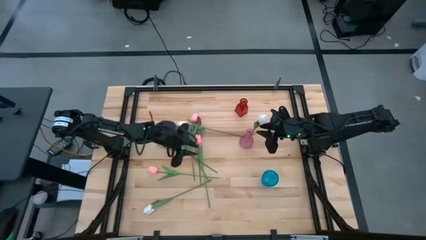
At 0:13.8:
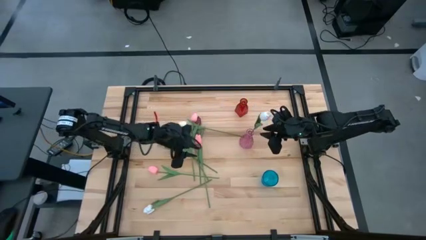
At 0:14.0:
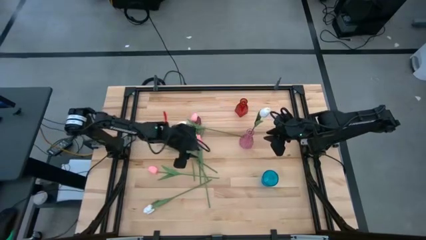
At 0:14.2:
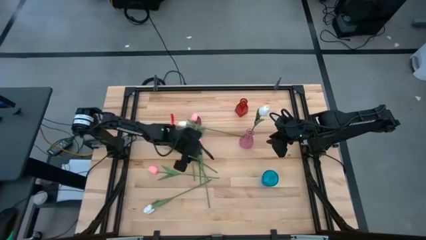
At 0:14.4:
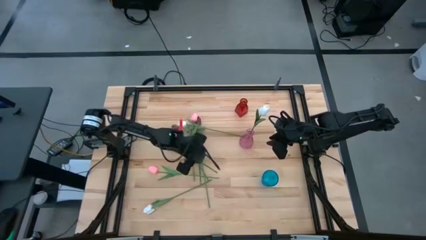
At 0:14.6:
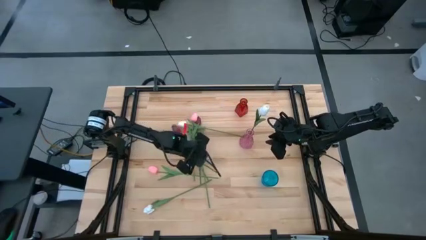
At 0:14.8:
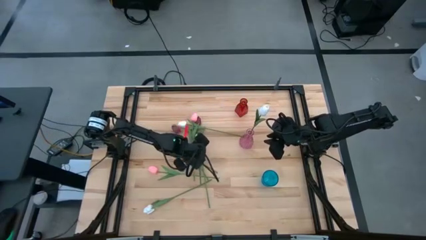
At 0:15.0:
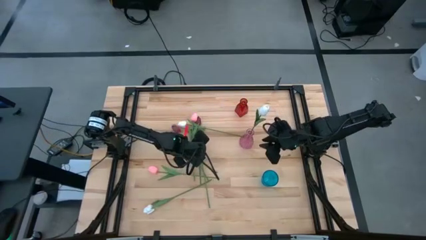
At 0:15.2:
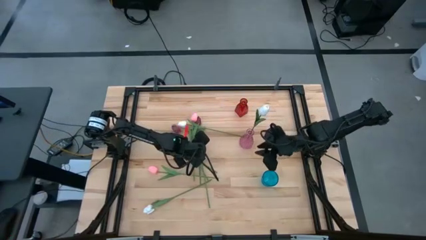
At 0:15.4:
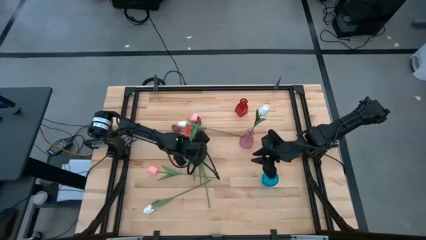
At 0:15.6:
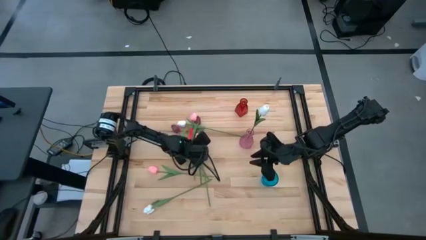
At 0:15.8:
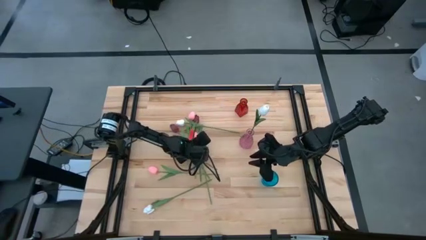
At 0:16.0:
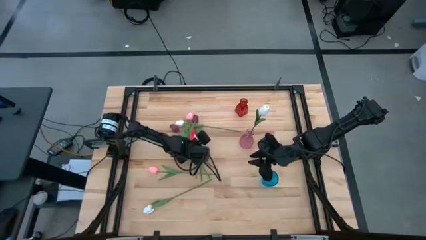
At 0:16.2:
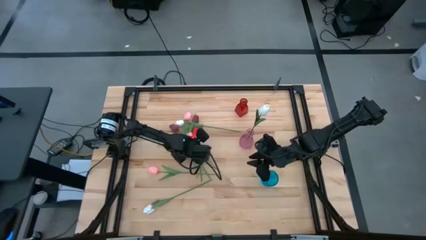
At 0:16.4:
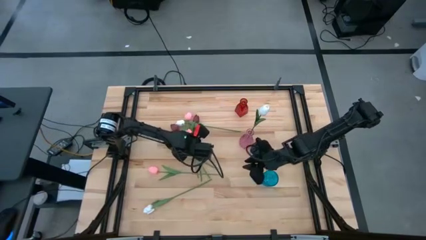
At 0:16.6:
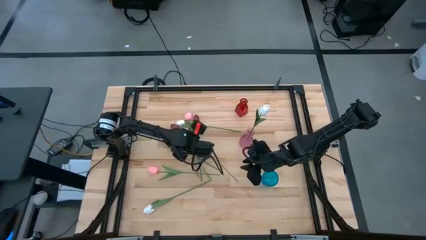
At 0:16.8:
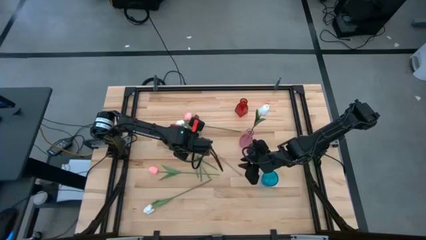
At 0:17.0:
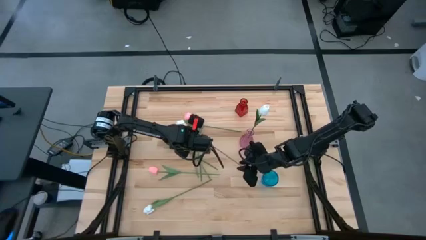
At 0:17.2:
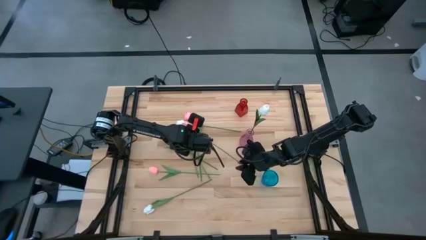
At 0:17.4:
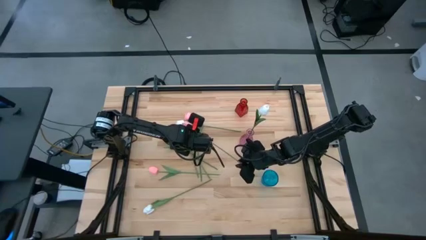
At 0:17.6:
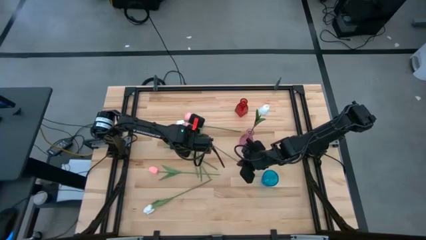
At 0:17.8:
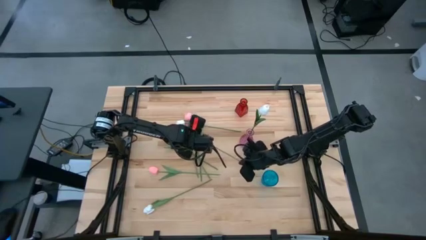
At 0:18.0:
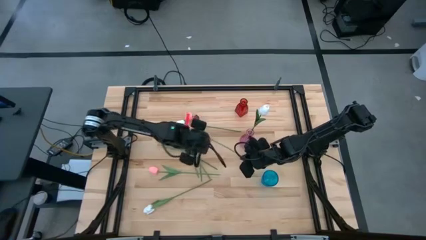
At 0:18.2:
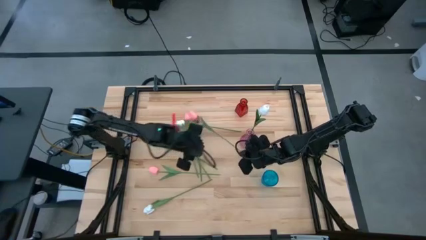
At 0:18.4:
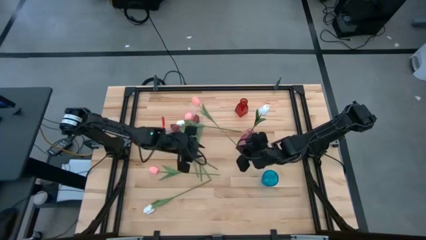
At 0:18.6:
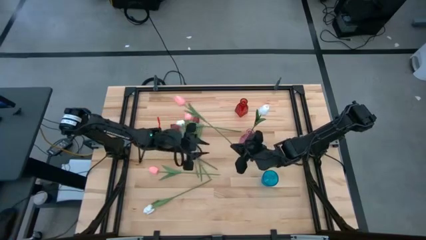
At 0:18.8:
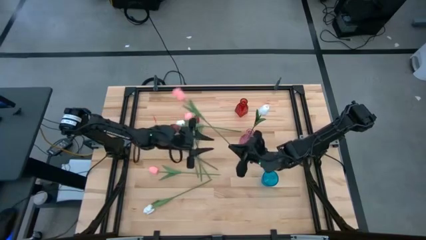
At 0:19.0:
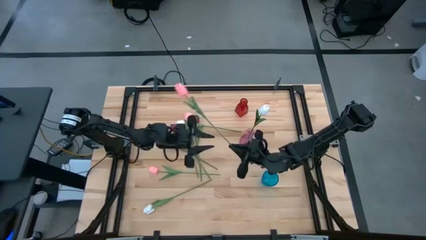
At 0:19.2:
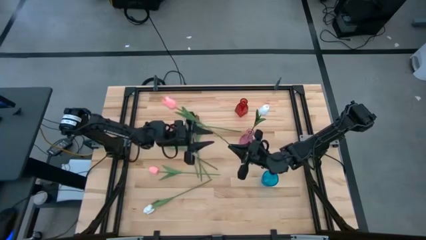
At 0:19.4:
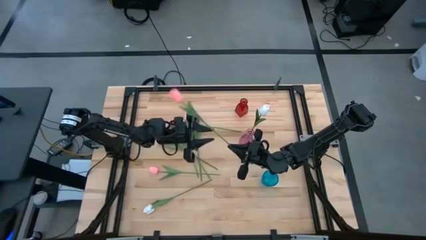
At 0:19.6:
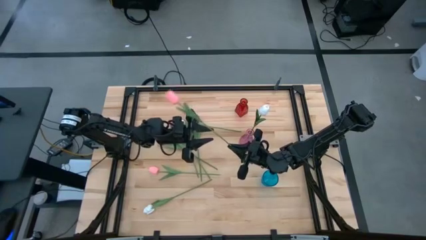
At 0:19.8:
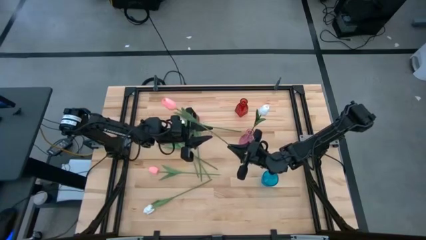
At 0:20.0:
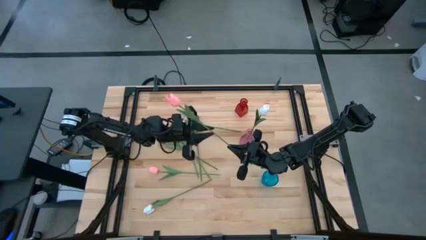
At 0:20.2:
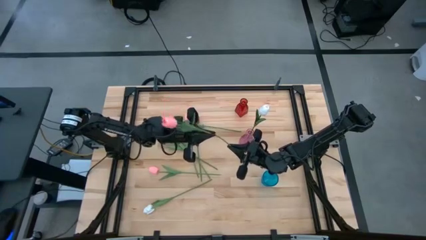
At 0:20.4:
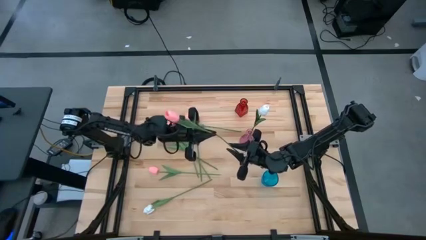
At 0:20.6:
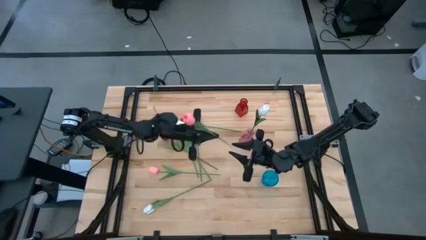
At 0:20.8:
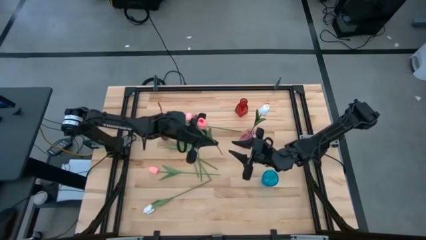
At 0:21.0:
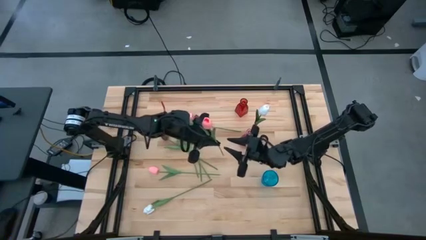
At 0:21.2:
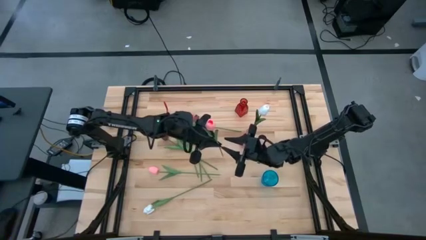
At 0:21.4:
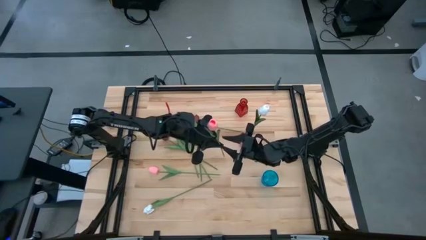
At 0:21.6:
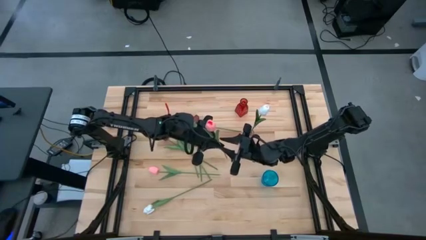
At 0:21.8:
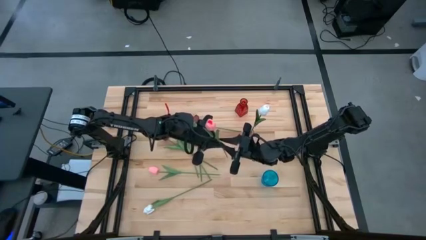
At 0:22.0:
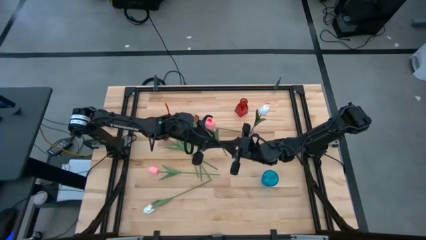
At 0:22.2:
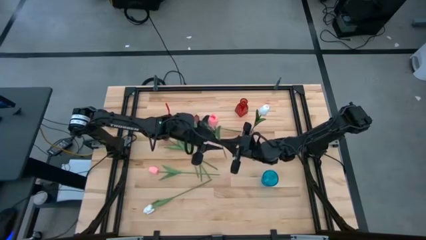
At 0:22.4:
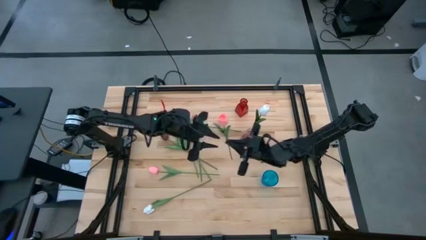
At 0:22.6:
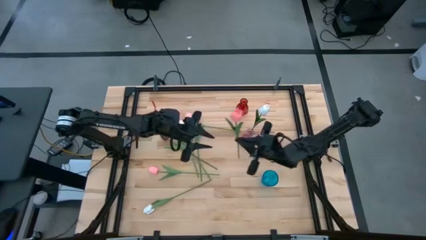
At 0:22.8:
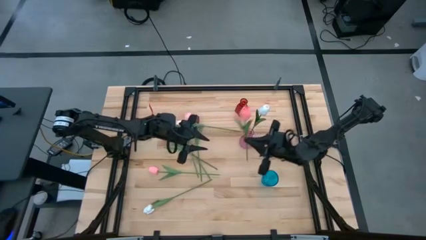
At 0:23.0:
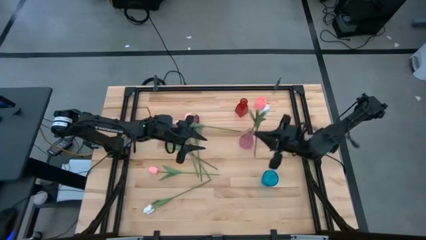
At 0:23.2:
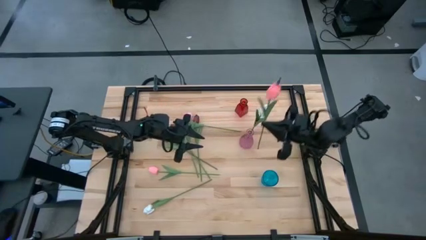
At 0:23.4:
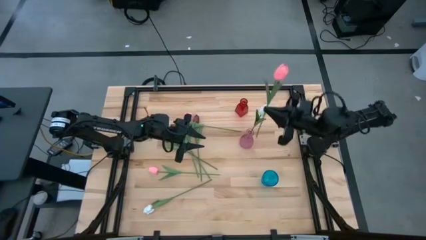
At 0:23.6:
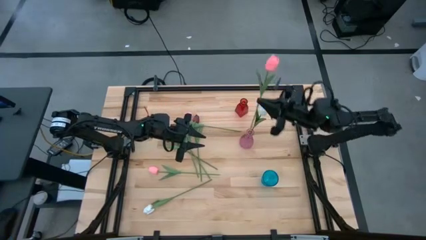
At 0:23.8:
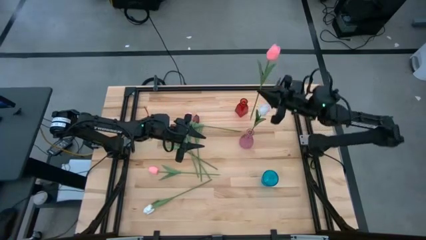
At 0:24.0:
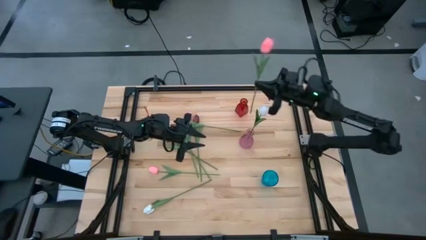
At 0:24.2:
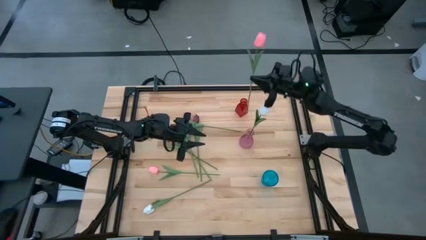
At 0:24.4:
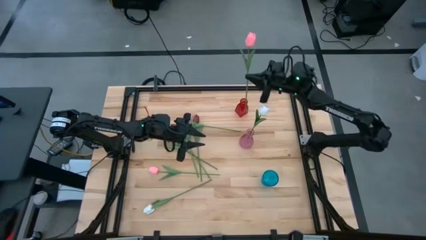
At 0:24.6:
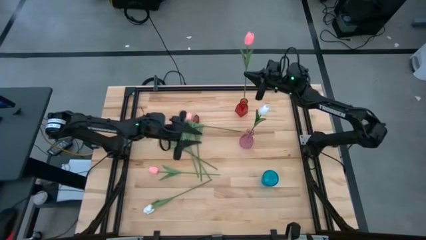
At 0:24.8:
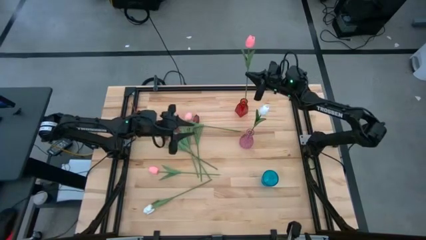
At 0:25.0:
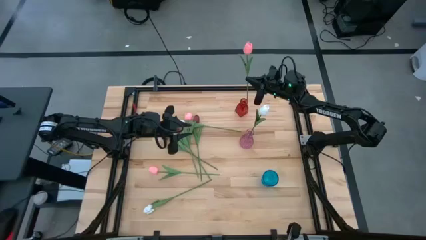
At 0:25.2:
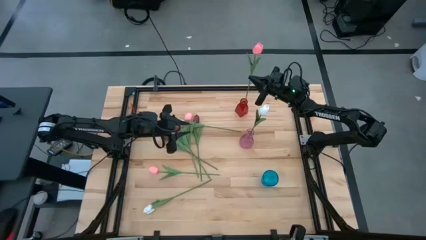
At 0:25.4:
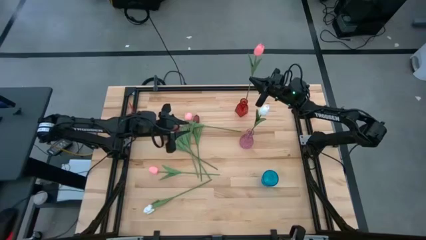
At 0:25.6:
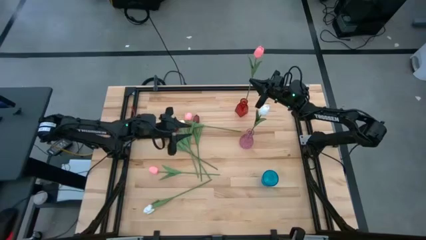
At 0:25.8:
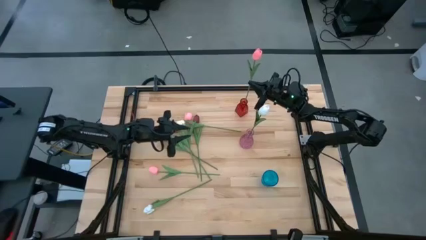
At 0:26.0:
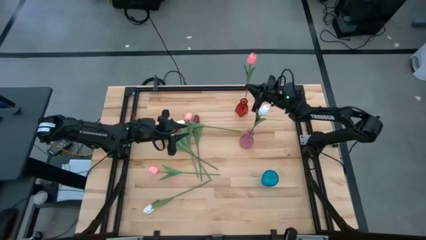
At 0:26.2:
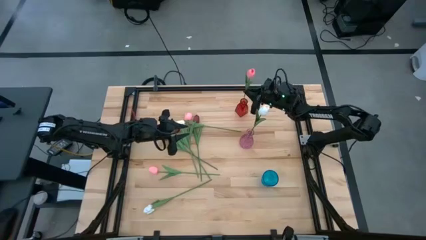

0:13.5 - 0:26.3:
Task: Sort flowers into vase by color
Put the center pink tulip into the red vase

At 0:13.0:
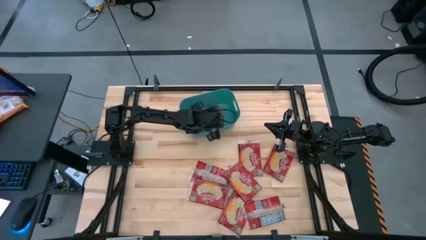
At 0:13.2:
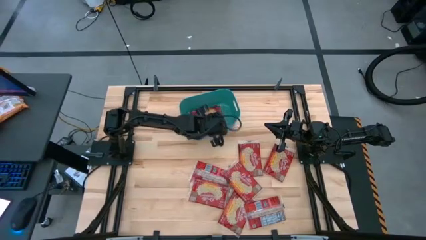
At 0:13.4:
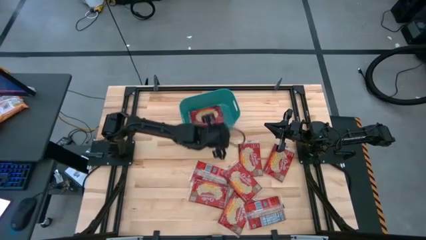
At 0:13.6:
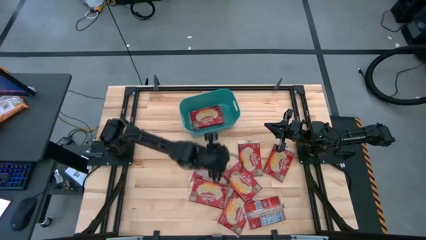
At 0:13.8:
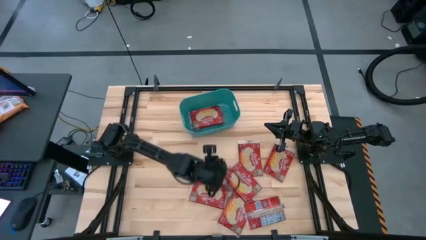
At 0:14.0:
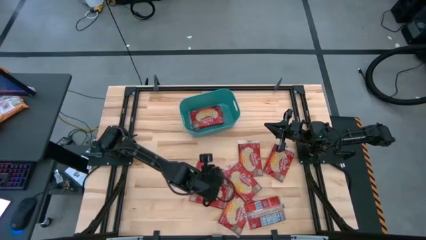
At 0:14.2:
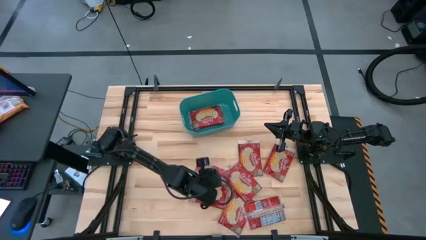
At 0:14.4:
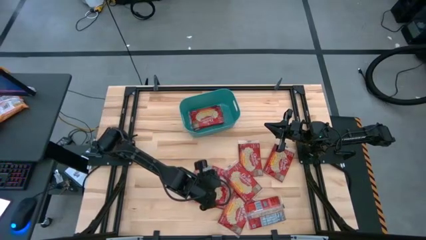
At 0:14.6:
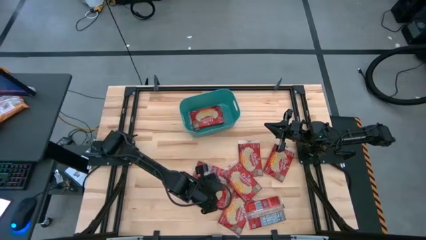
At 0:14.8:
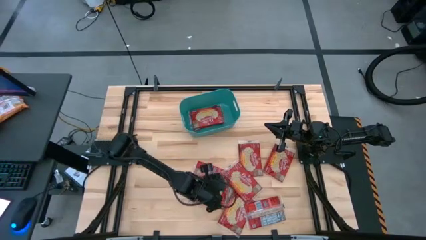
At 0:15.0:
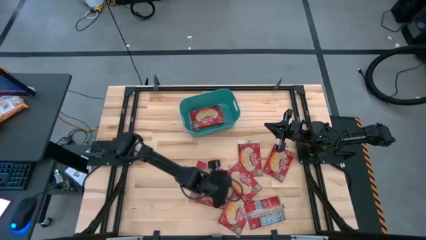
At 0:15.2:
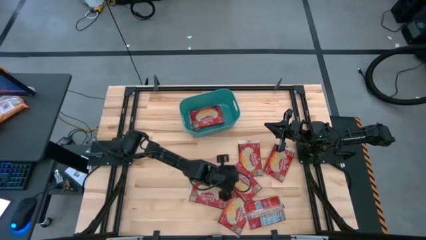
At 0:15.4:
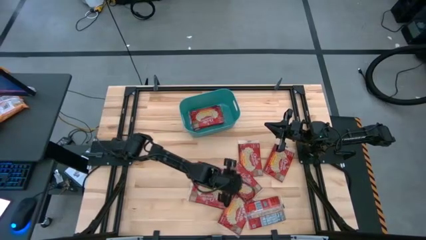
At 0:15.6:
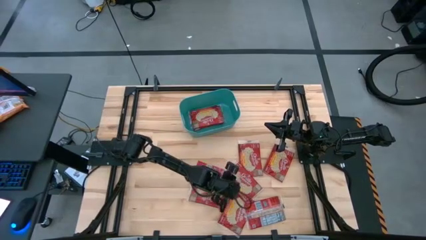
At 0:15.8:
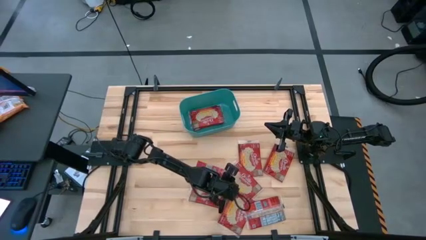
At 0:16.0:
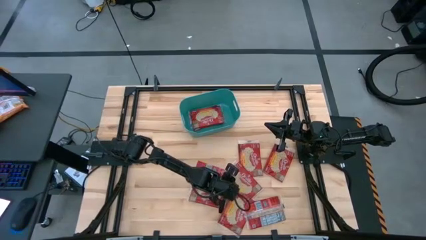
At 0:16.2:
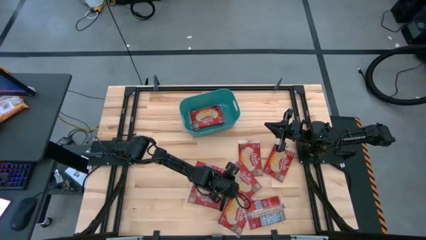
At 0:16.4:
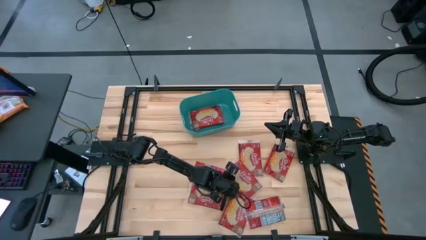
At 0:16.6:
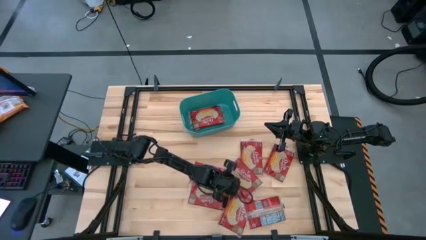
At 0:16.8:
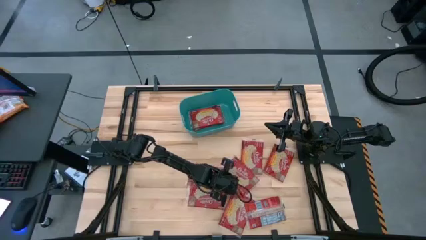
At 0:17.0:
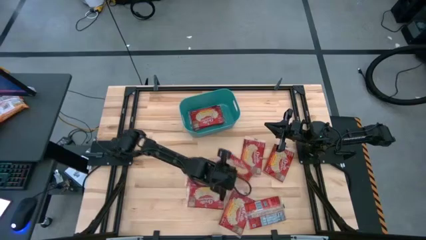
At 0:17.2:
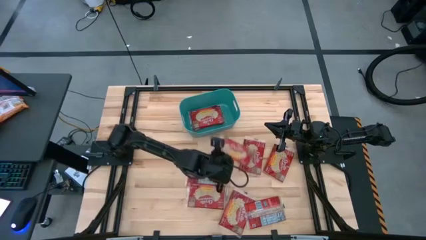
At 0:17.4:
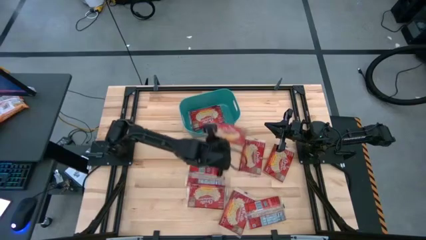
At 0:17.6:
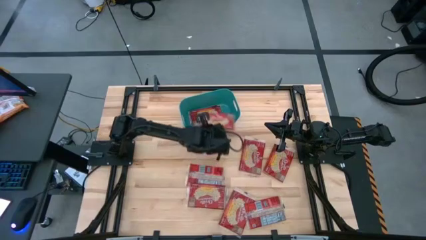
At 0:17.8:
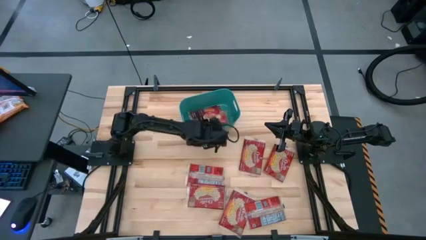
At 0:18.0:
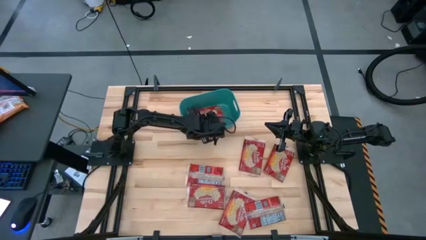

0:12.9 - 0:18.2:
Task: Sort popcorn bags into baskets
Put the red popcorn bag into the green bin
